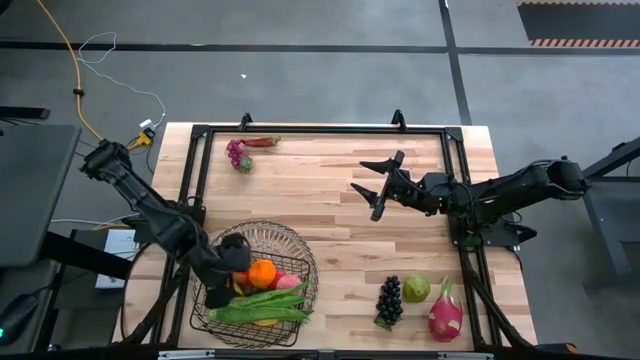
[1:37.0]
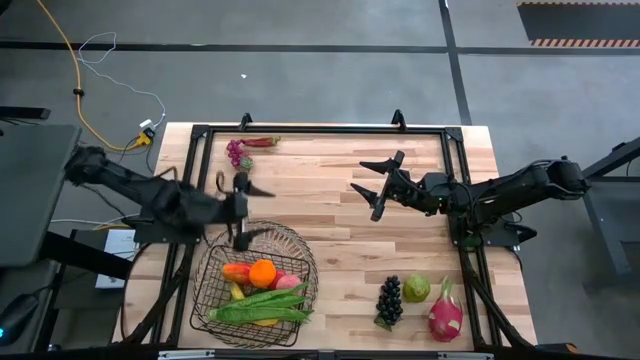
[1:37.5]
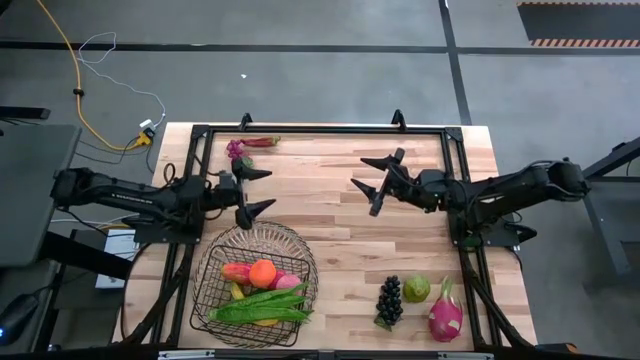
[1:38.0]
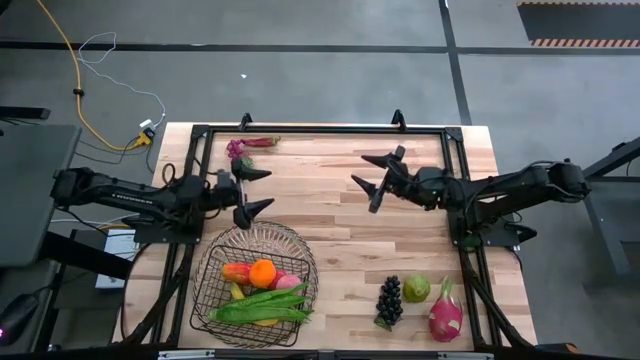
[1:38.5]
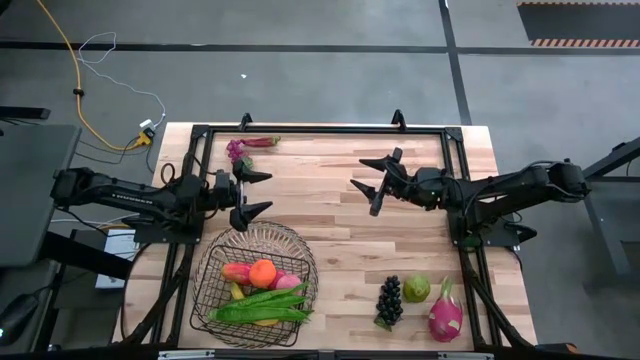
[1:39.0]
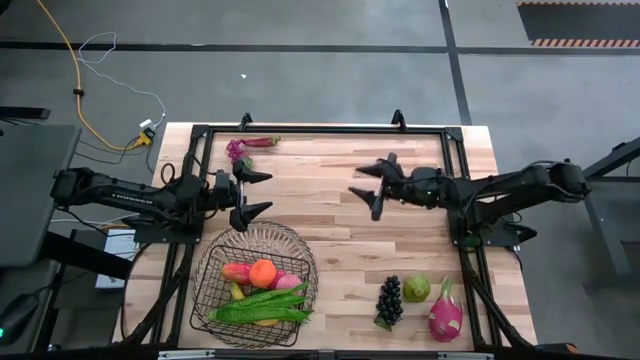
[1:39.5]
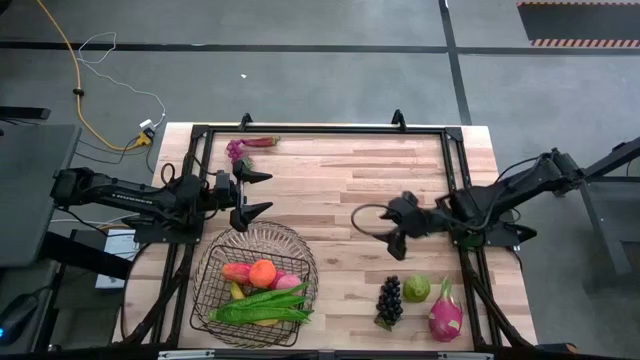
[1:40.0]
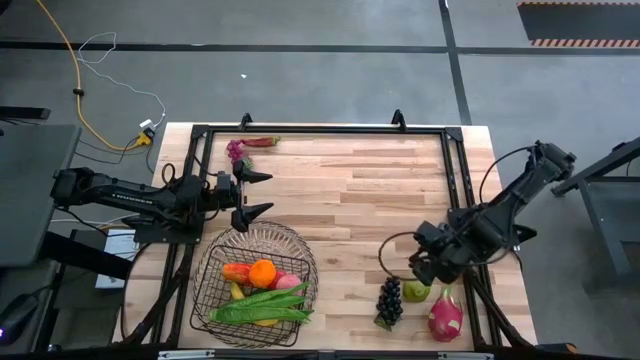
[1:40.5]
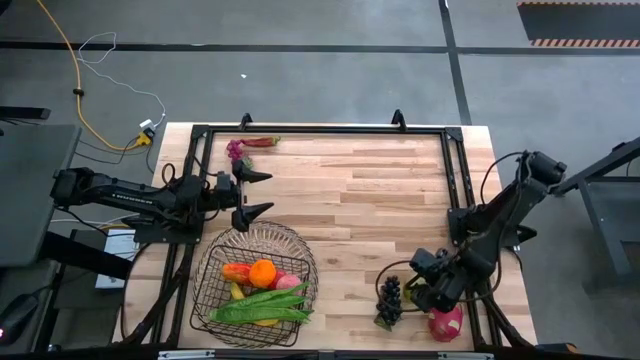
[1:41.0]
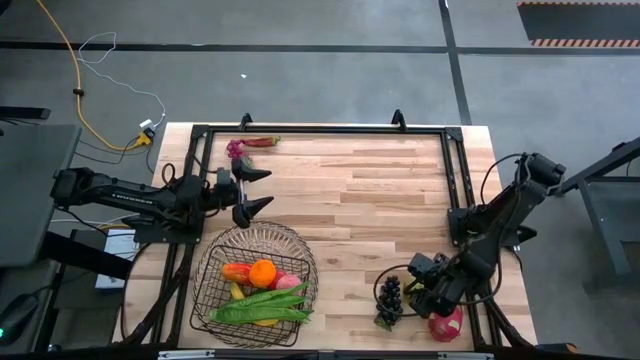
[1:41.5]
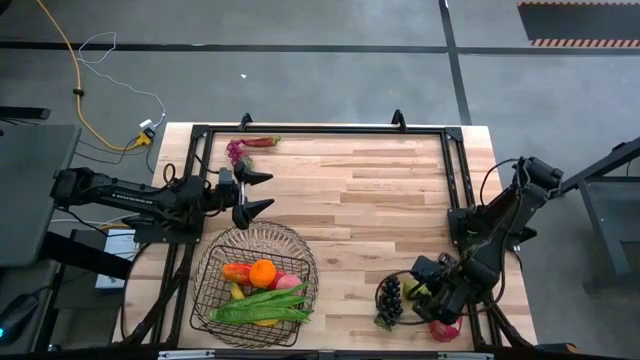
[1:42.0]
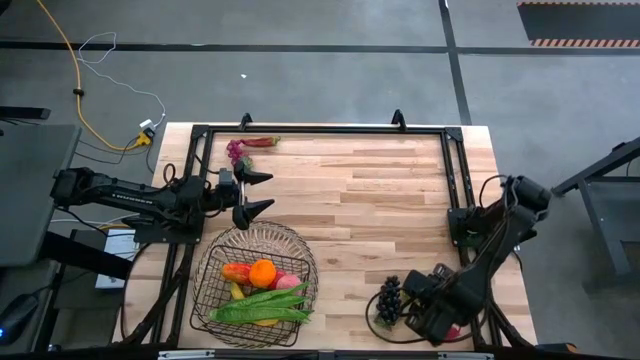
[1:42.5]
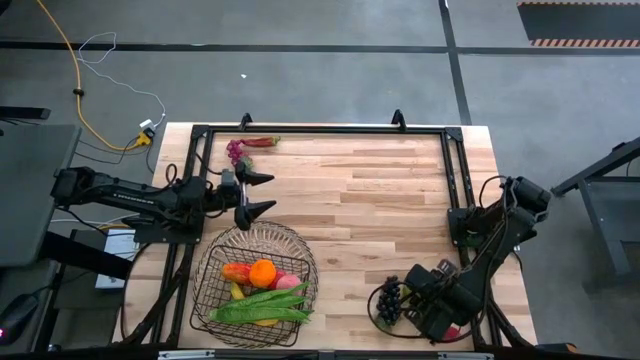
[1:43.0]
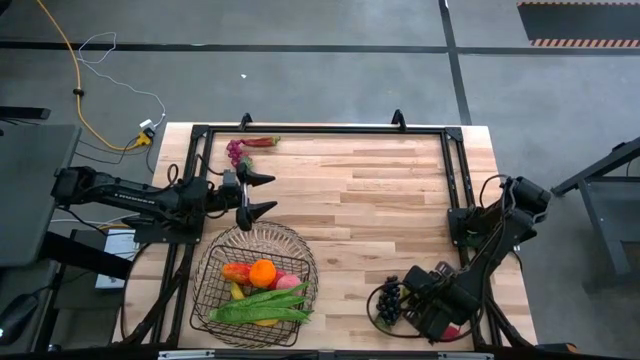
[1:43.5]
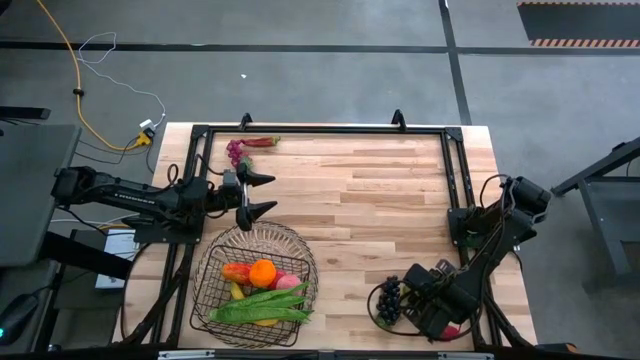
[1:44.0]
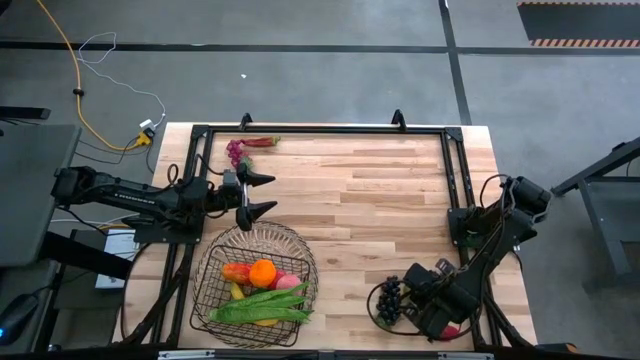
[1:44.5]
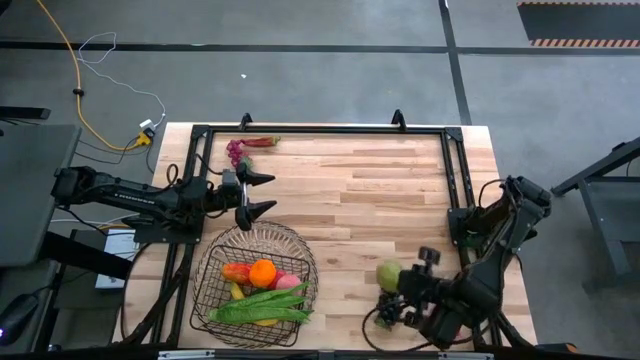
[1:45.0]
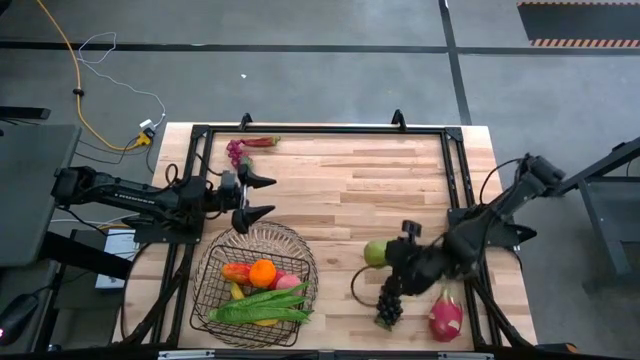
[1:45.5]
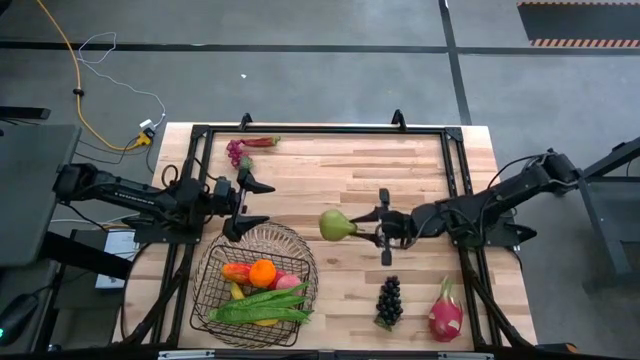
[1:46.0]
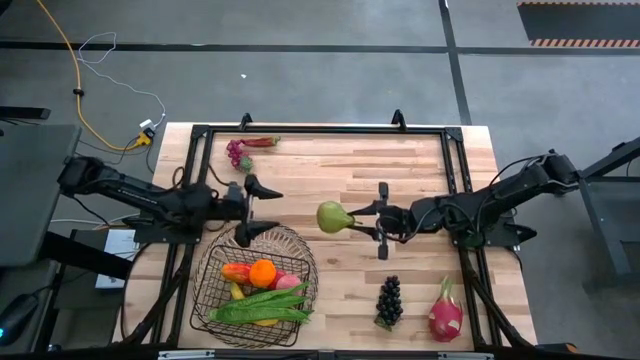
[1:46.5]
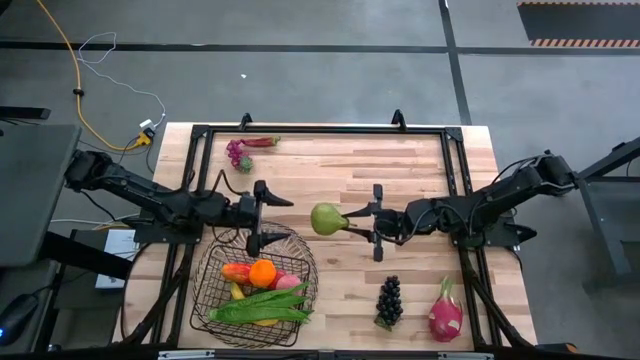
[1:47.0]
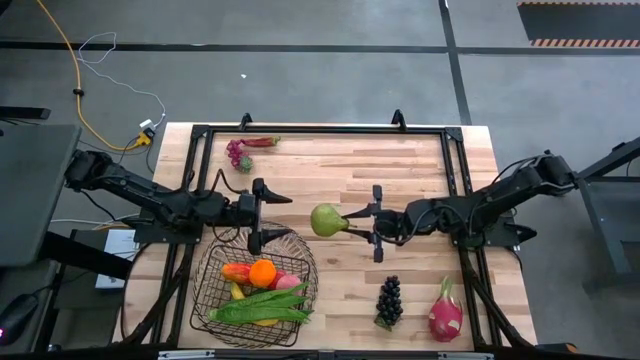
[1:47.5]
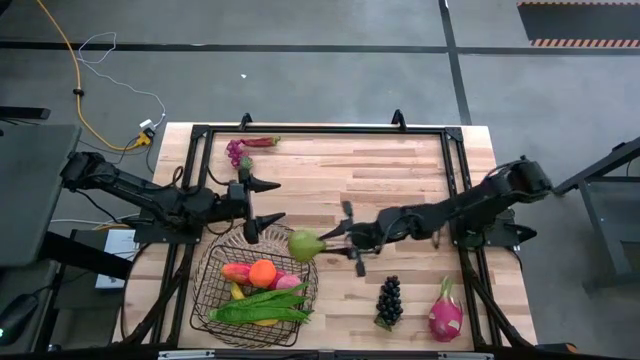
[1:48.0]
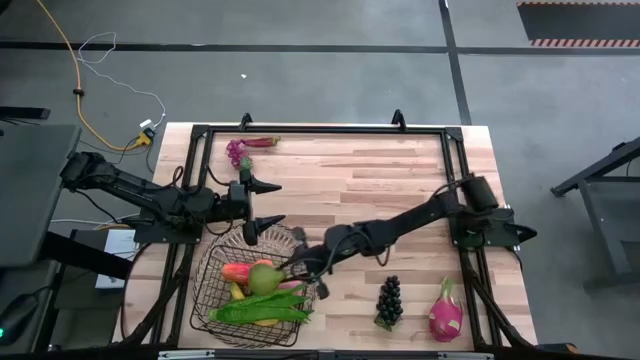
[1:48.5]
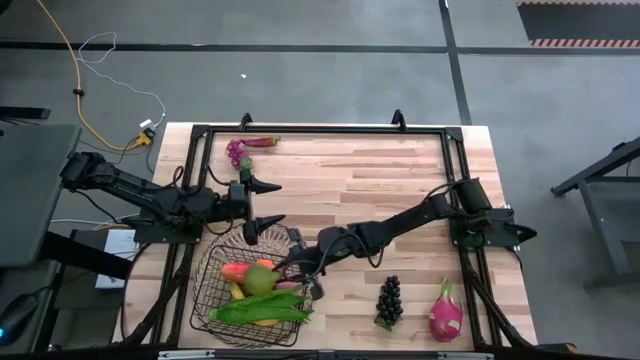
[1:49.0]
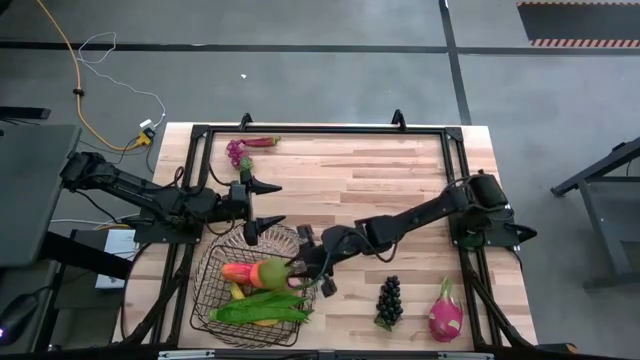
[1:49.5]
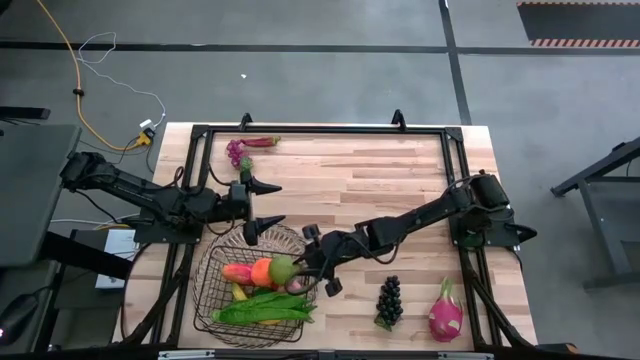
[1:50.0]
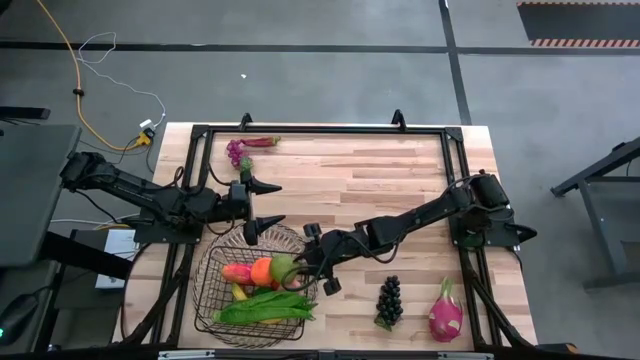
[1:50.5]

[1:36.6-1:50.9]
Task: Build produce basket
Put the green pear into the black wire basket

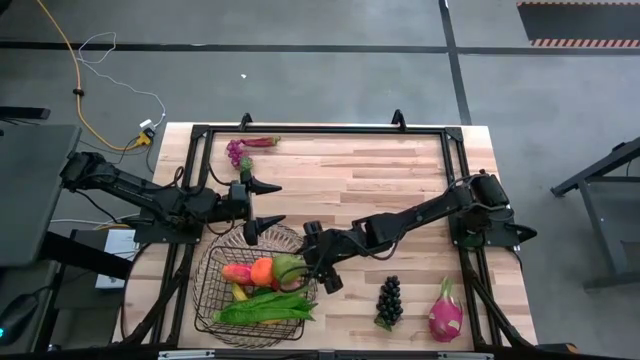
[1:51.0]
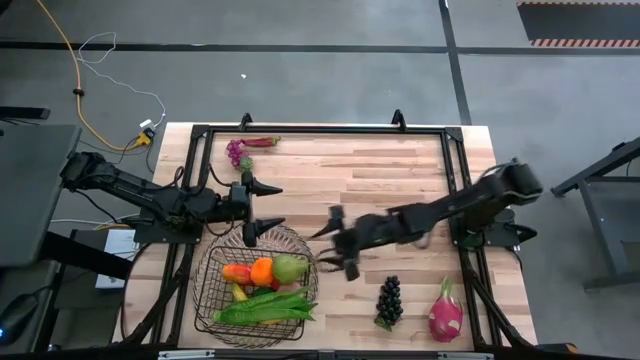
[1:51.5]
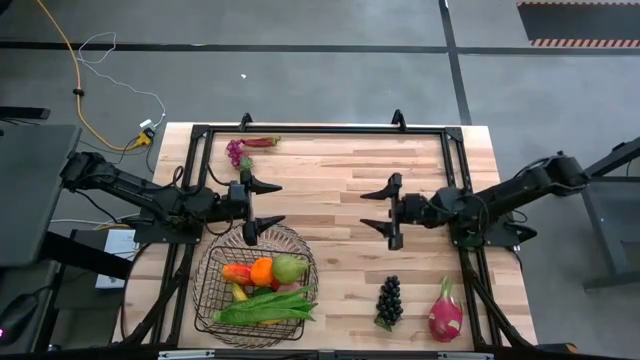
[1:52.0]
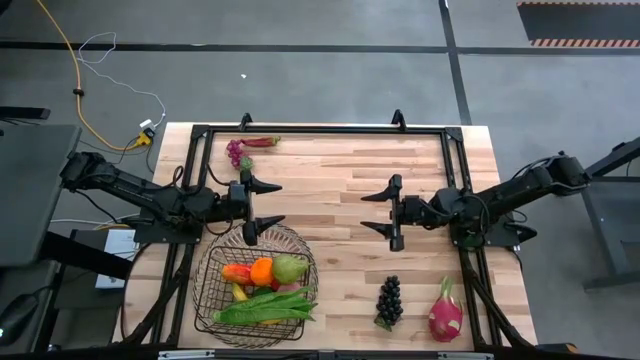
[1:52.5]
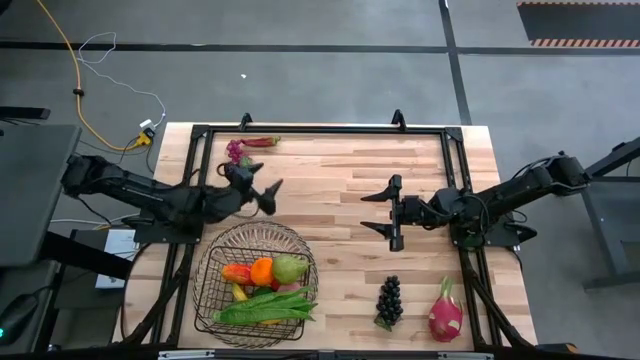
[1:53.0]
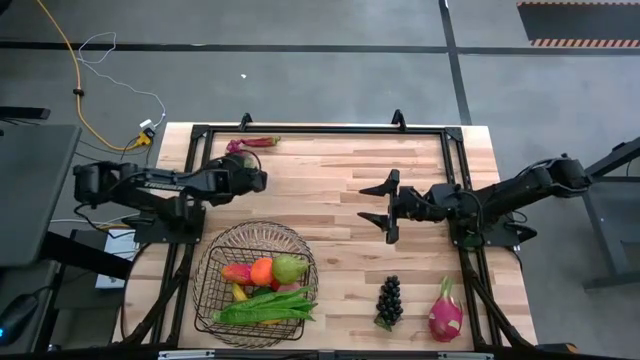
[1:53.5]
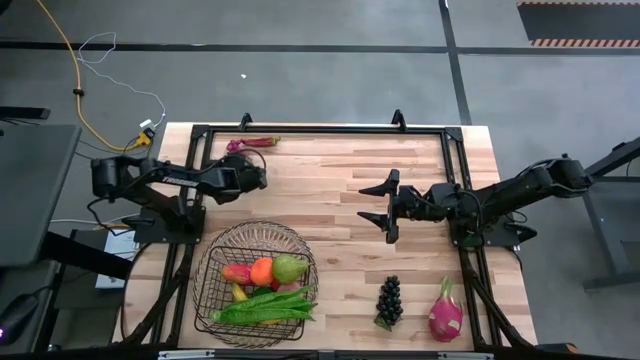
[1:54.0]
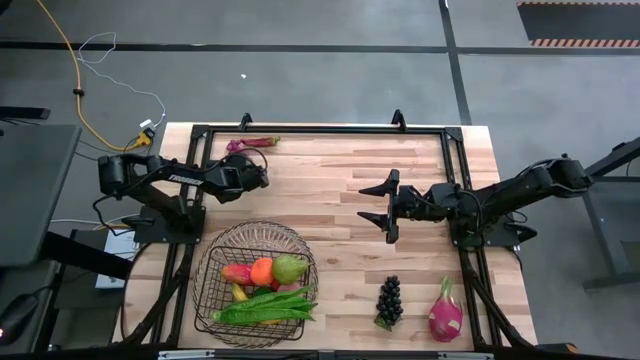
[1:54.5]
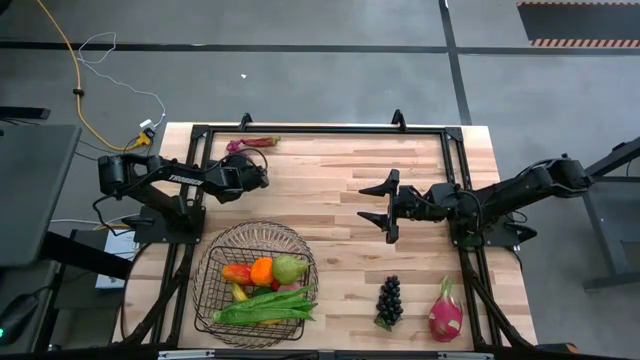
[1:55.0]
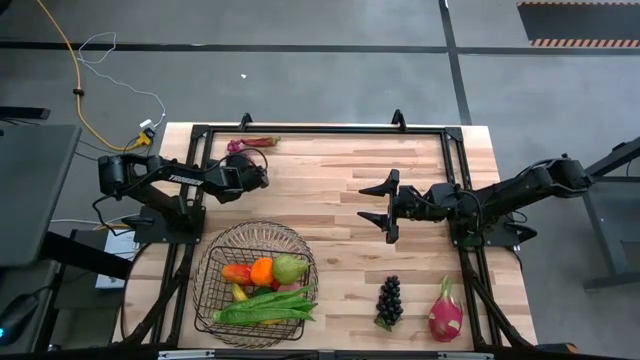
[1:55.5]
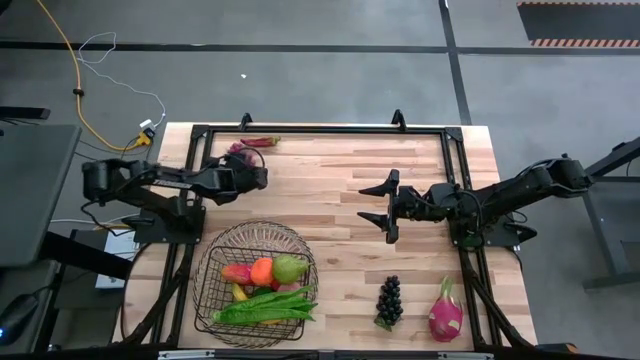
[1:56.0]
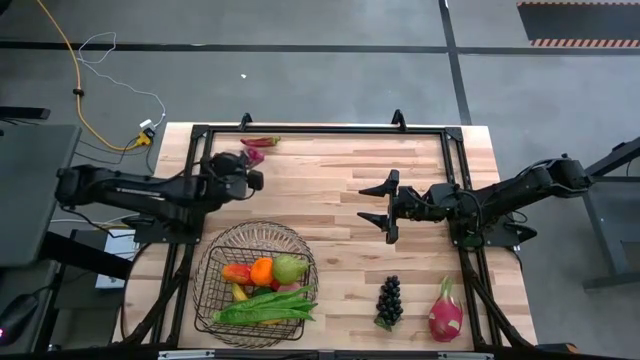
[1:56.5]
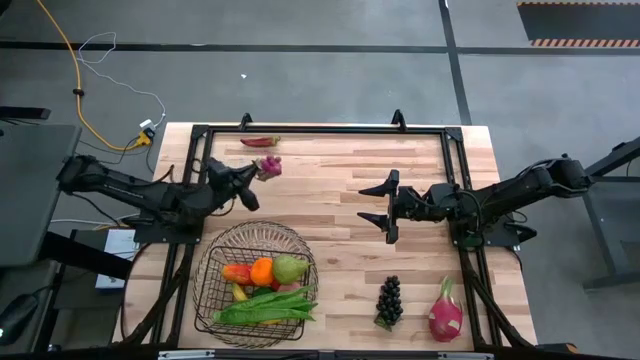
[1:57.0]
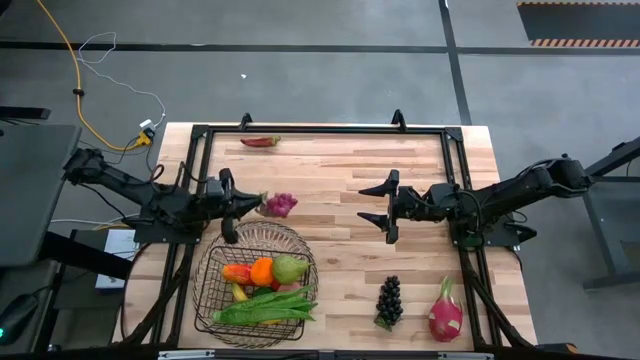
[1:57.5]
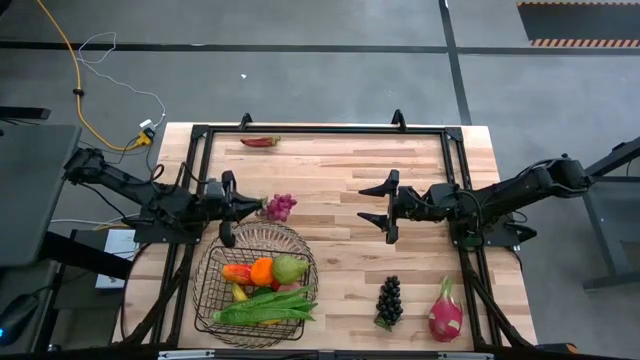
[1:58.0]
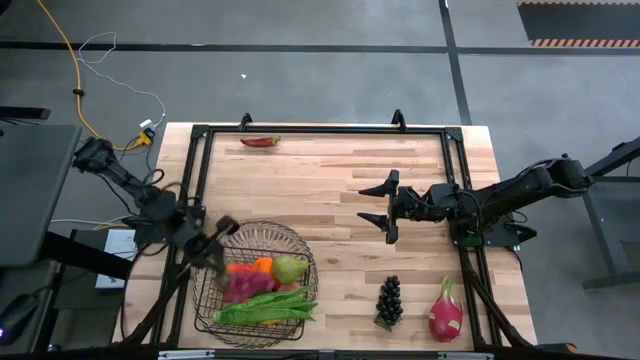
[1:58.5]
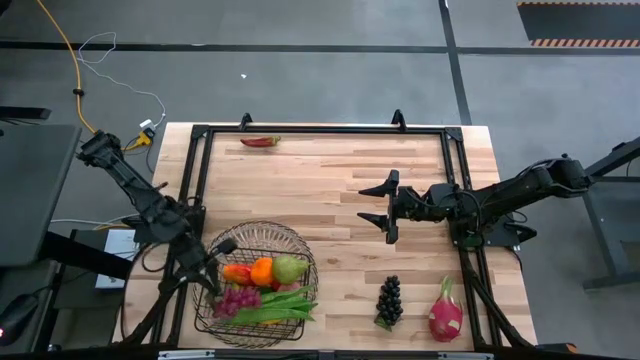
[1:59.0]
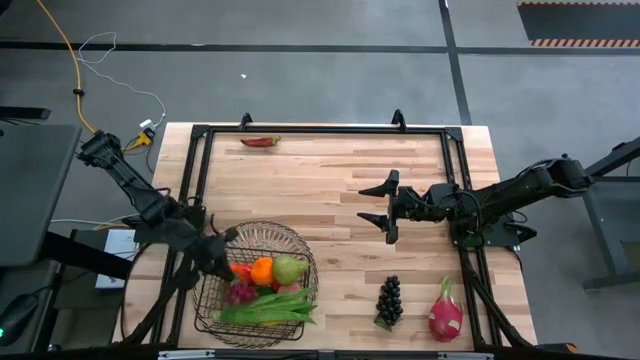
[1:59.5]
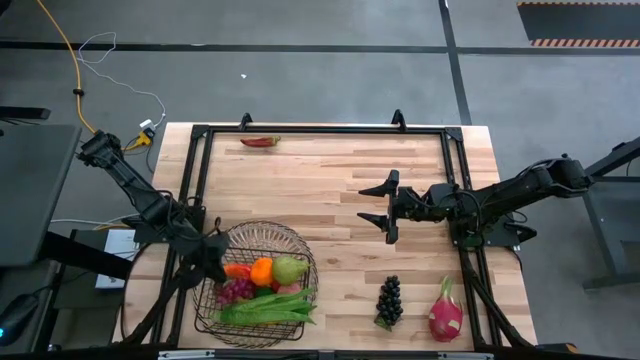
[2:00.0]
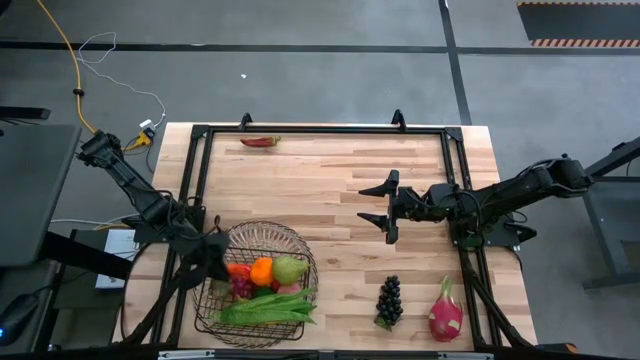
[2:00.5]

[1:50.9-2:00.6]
Put the pink grapes into the black wire basket
